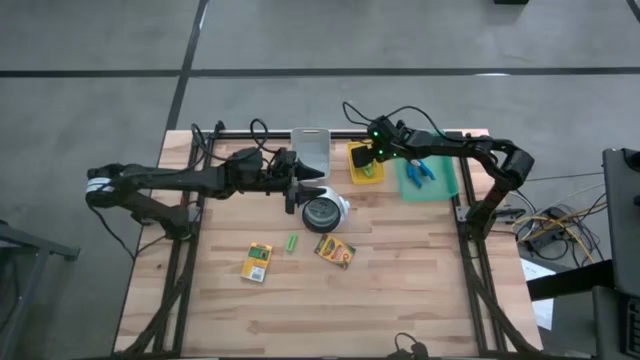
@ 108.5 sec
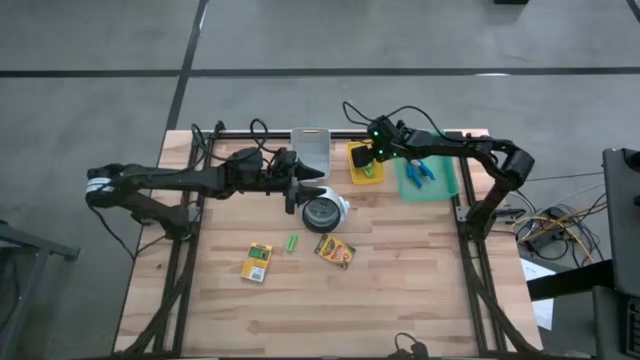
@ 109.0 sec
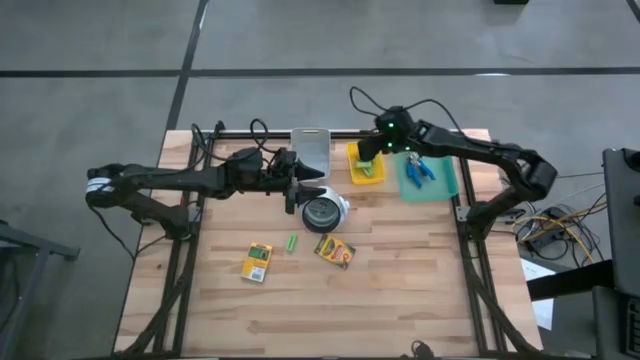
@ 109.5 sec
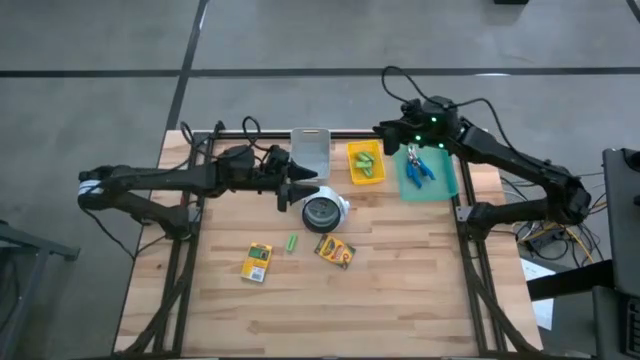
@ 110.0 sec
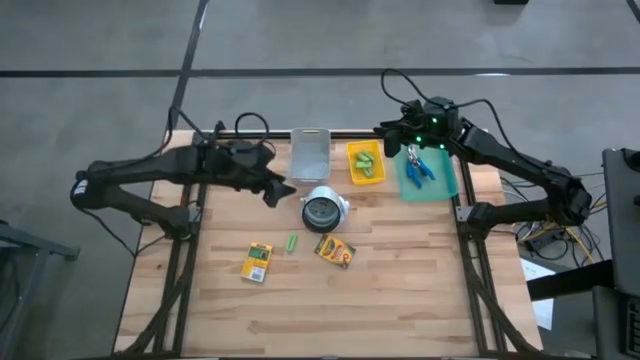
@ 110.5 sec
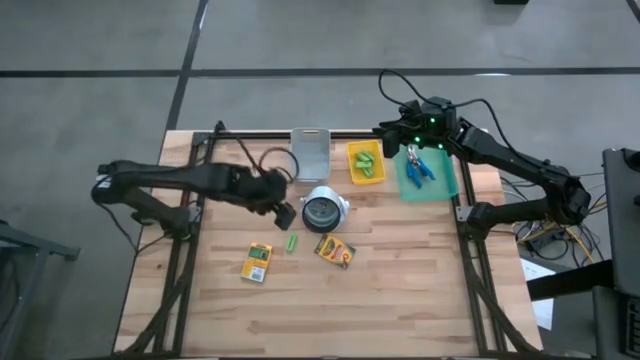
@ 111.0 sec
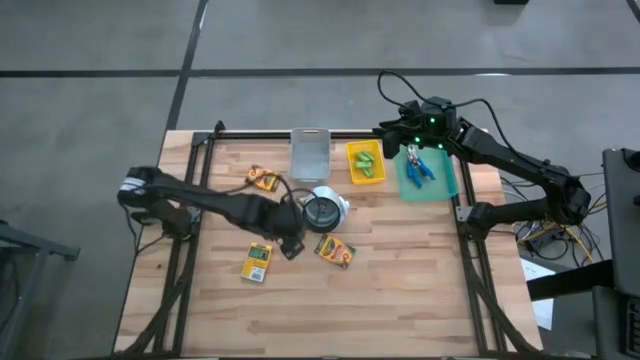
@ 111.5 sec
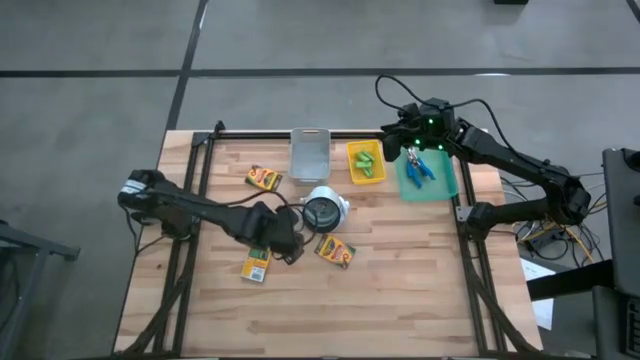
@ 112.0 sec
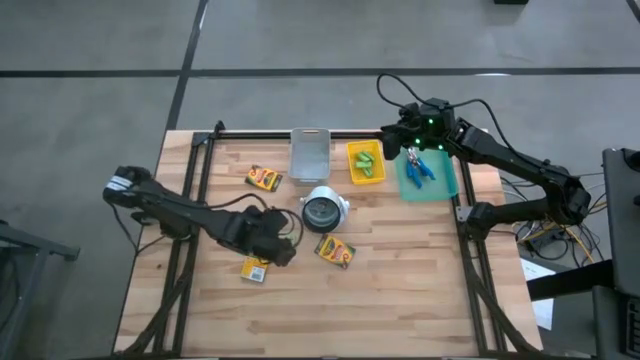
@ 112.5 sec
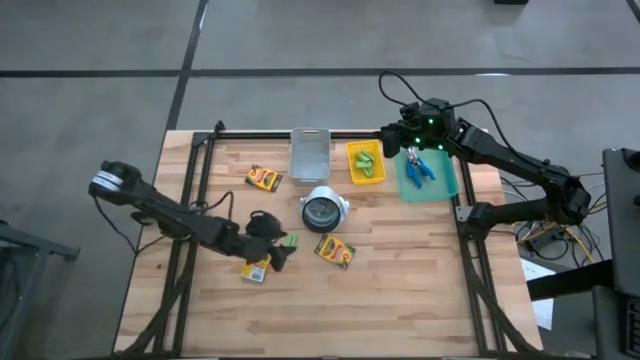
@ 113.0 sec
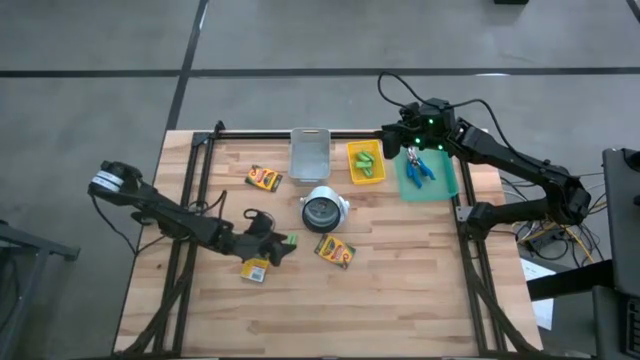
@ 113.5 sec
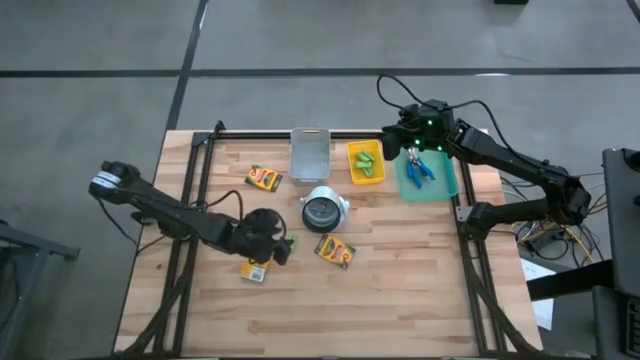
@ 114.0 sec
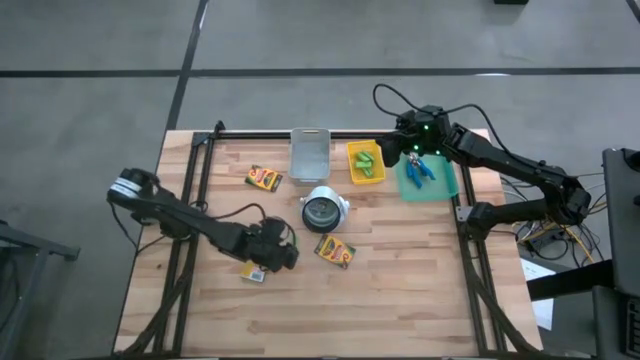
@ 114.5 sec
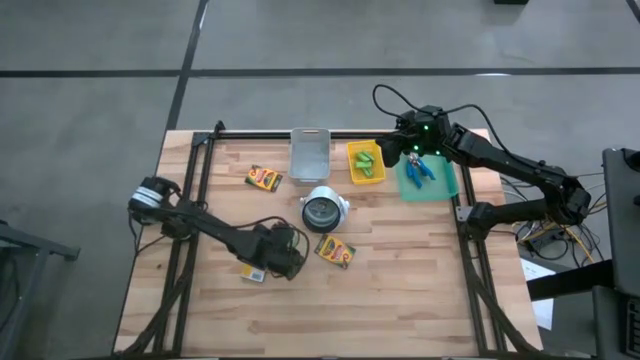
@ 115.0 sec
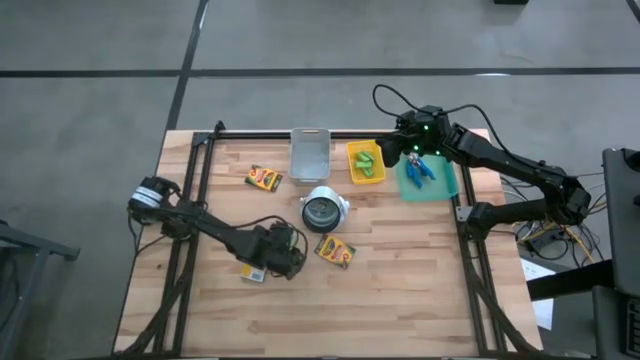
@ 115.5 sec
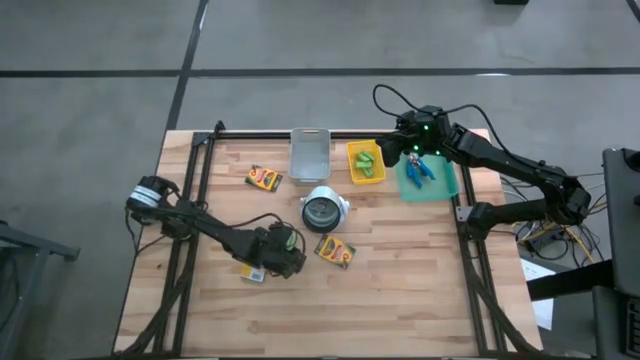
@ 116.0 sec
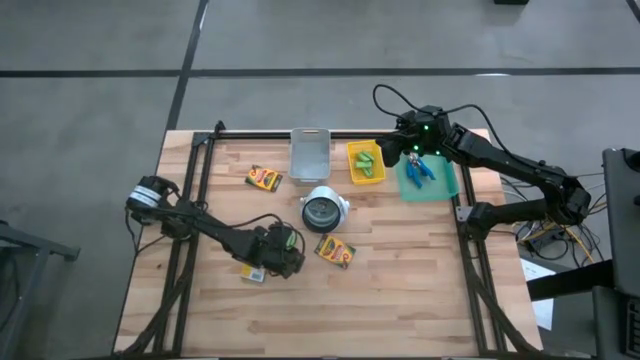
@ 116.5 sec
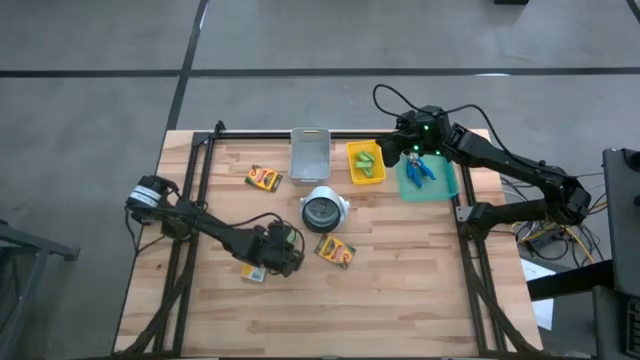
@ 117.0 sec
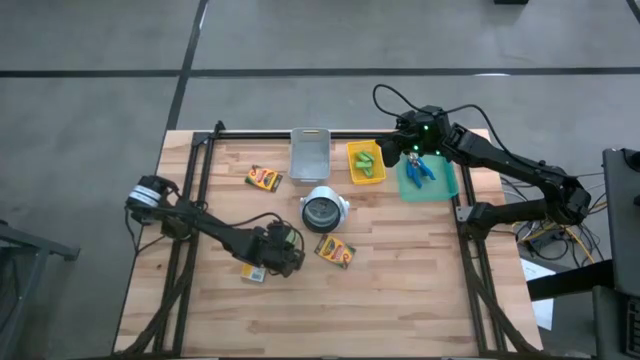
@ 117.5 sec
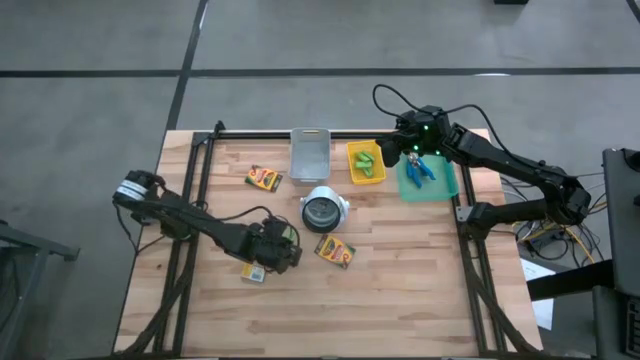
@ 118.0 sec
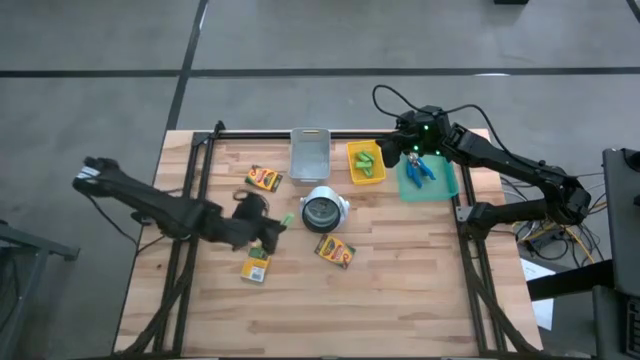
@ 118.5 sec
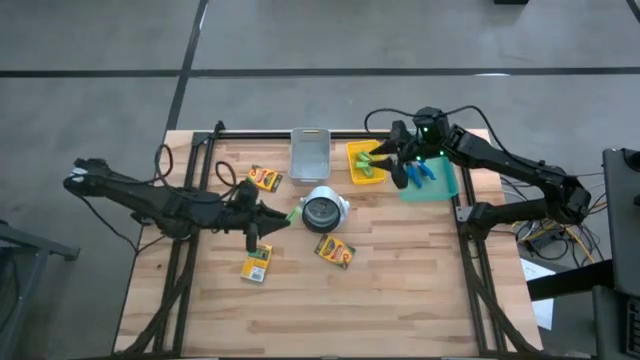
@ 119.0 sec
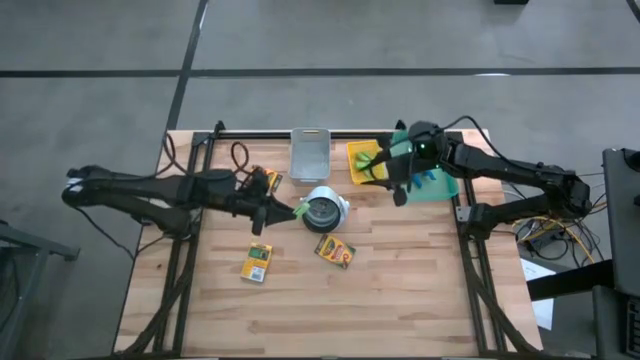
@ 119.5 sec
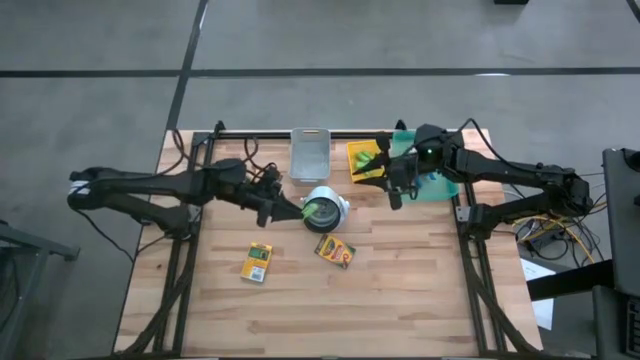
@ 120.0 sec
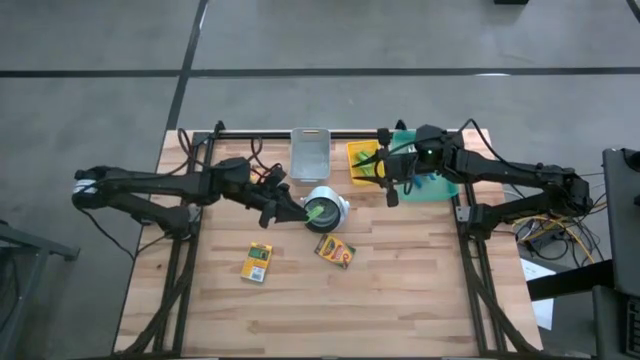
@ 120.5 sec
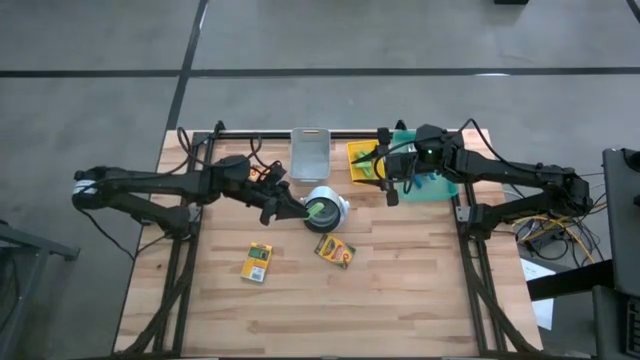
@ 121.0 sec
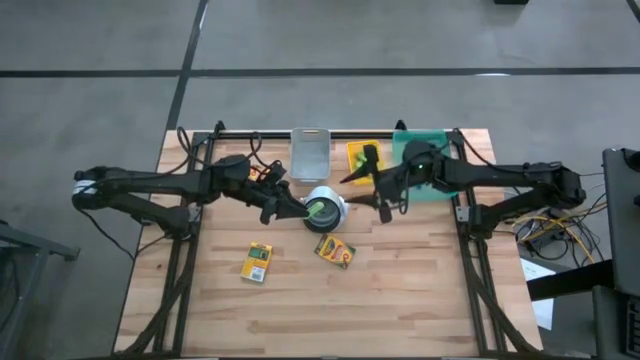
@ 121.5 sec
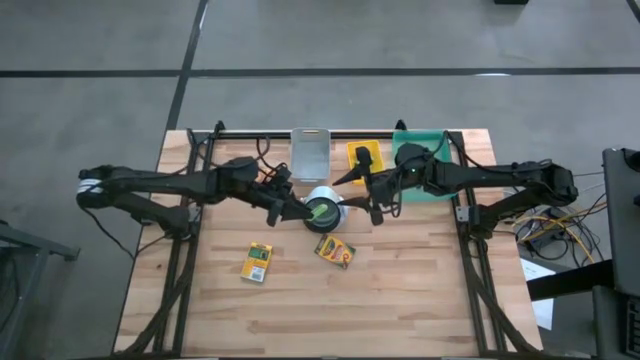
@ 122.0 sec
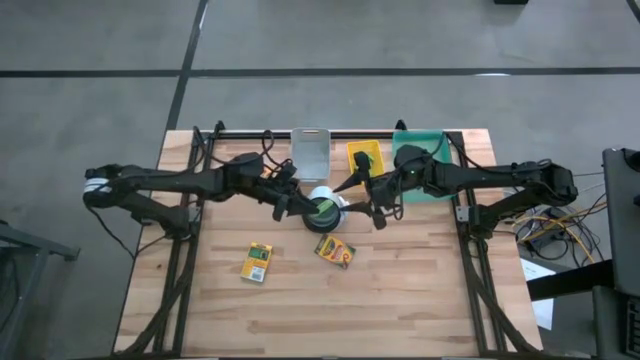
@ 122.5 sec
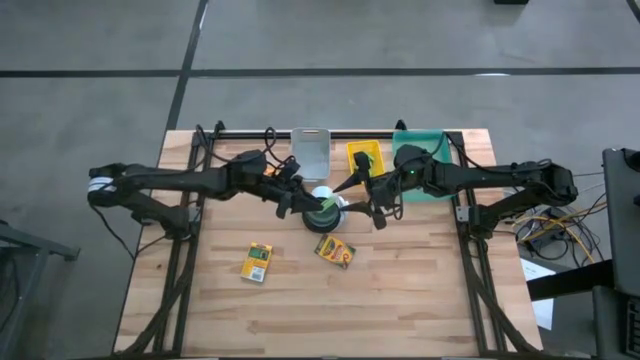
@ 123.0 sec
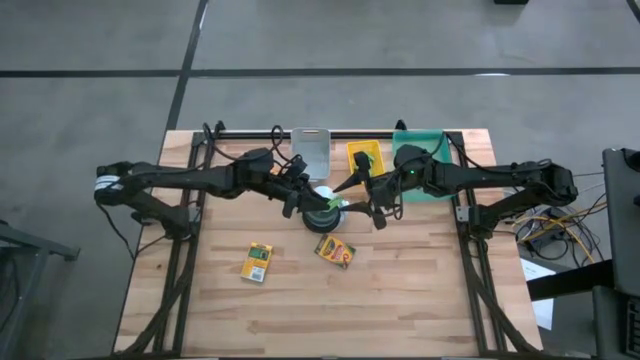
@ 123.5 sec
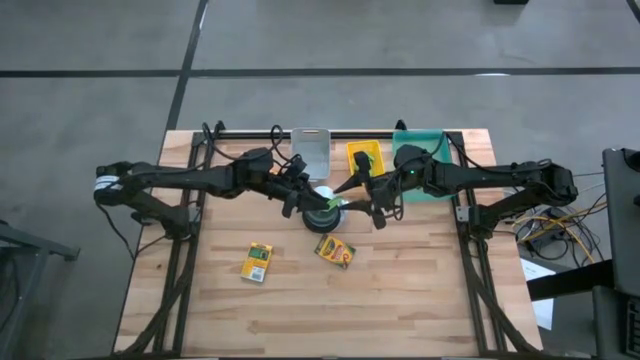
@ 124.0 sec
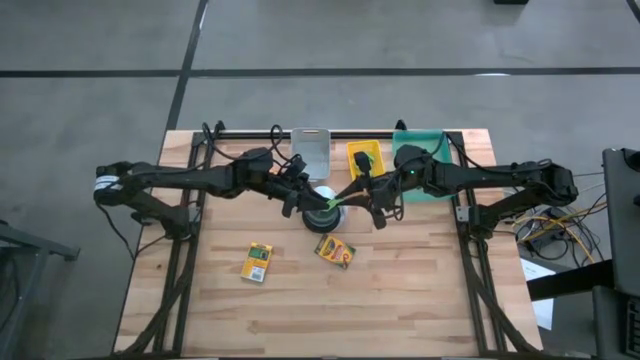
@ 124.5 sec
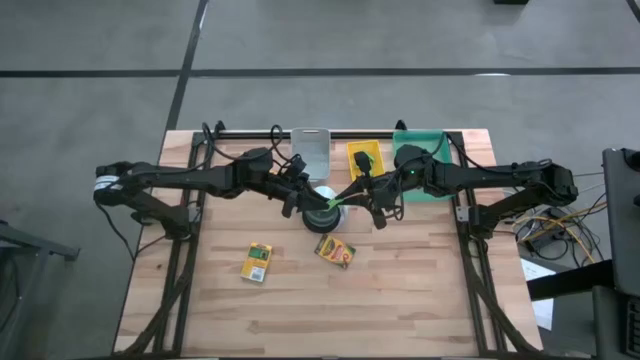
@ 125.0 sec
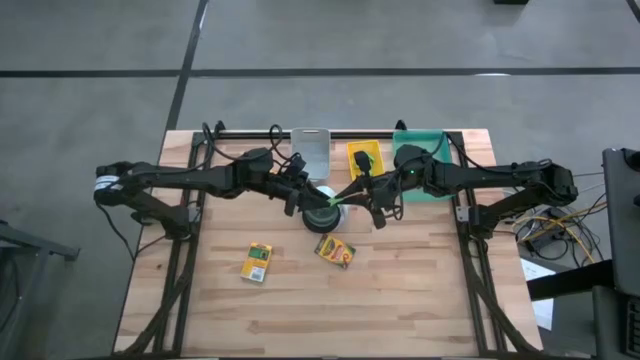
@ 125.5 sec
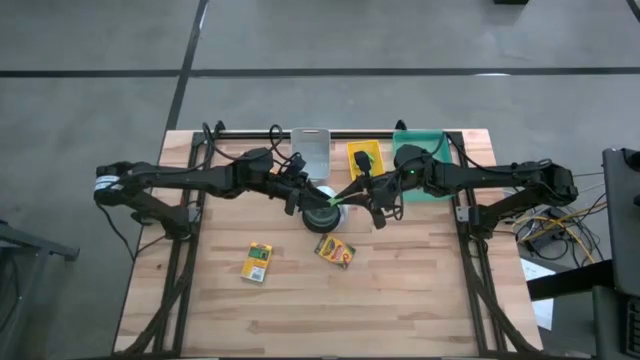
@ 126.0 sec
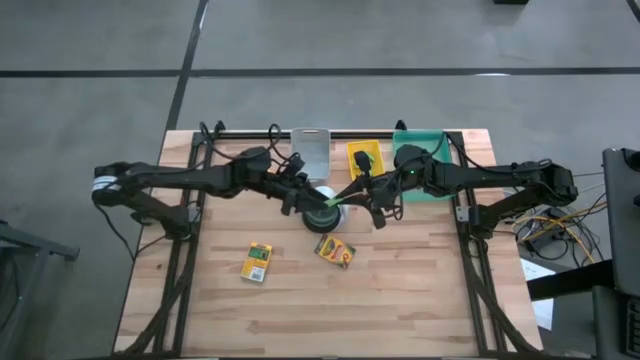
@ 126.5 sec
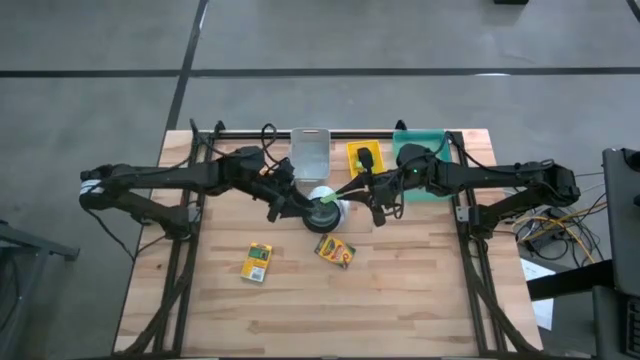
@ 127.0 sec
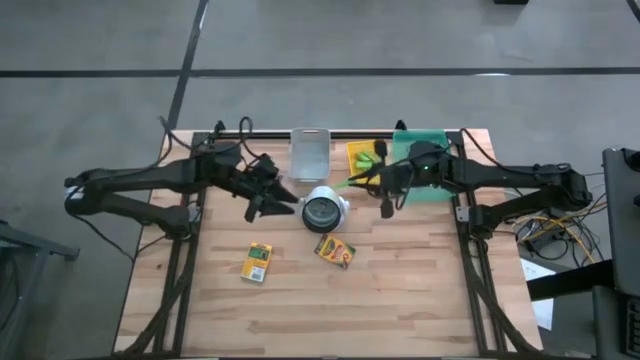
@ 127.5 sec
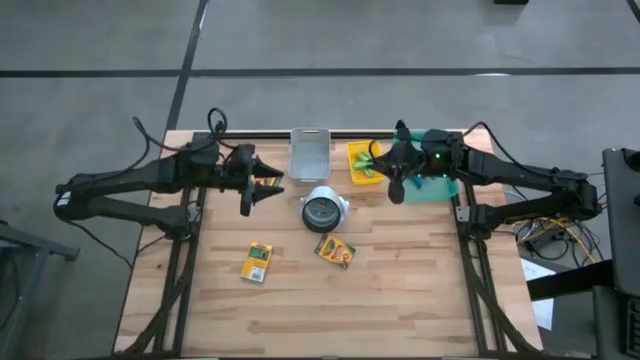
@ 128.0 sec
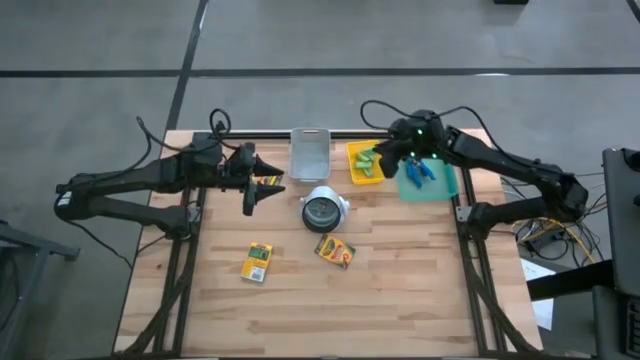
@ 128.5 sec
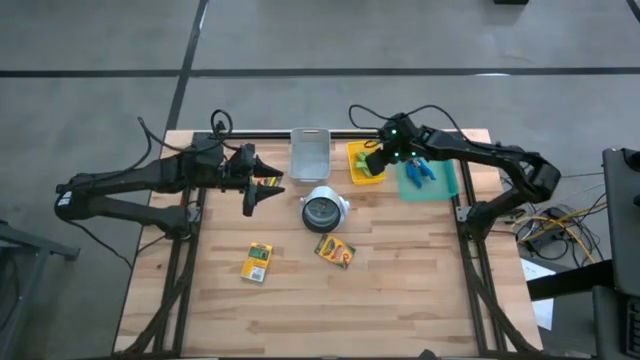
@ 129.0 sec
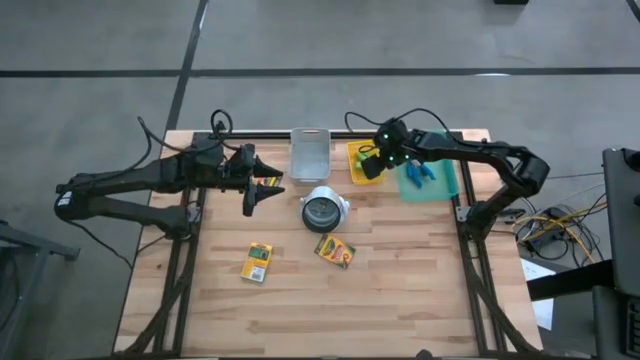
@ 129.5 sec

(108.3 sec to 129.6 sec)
Task: Pick & Place School Supplies
Put the green eraser into the yellow bin
